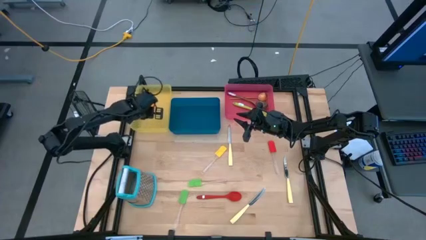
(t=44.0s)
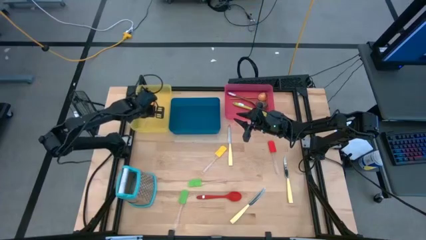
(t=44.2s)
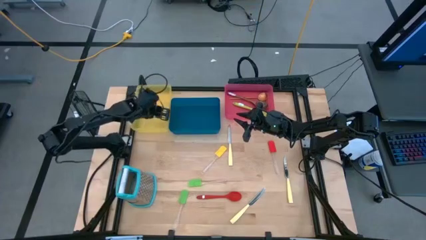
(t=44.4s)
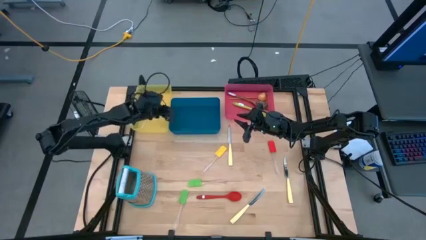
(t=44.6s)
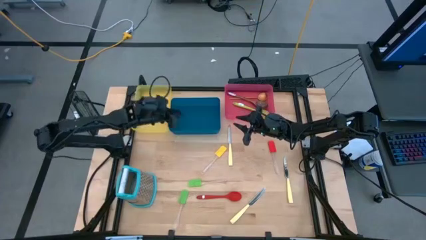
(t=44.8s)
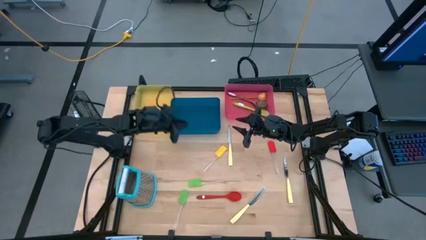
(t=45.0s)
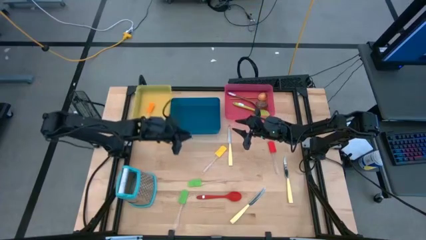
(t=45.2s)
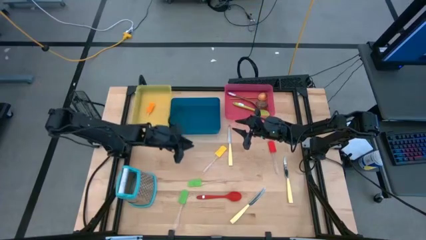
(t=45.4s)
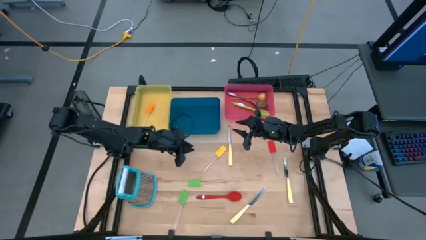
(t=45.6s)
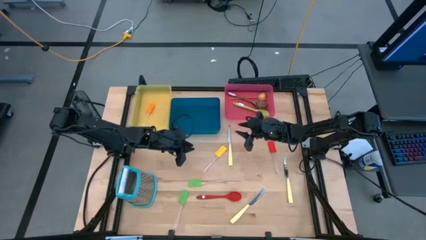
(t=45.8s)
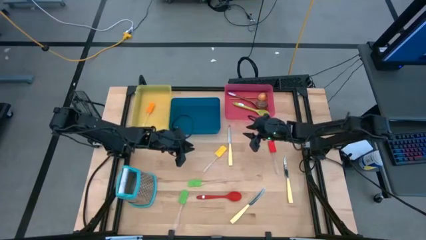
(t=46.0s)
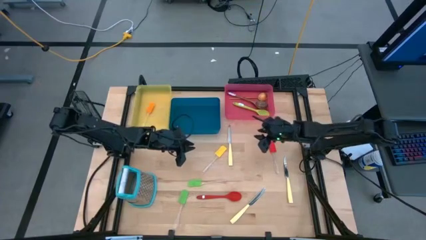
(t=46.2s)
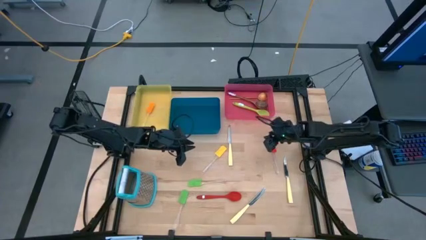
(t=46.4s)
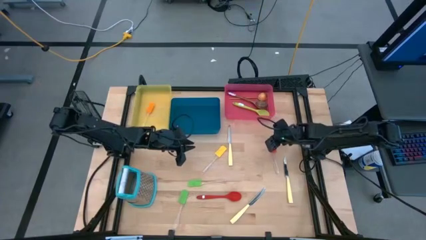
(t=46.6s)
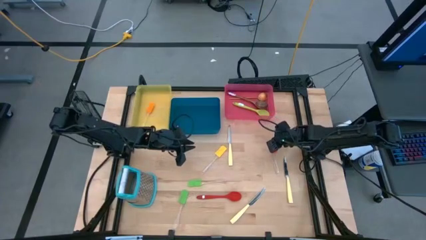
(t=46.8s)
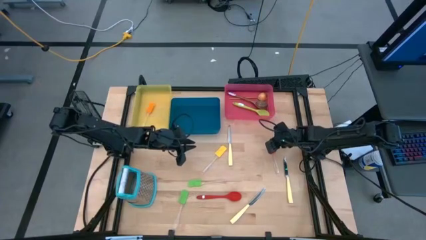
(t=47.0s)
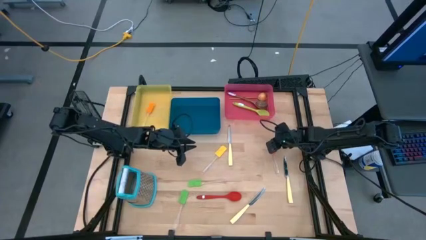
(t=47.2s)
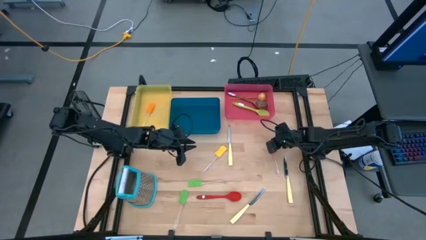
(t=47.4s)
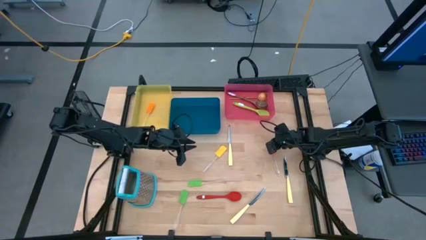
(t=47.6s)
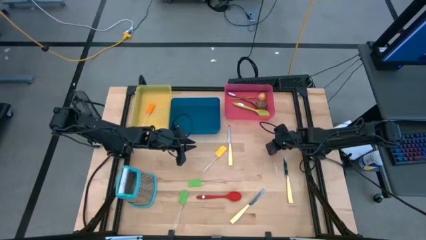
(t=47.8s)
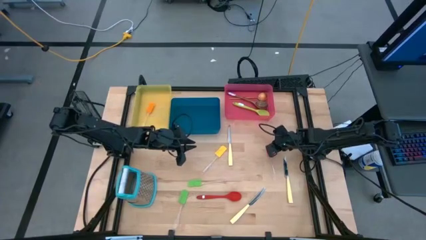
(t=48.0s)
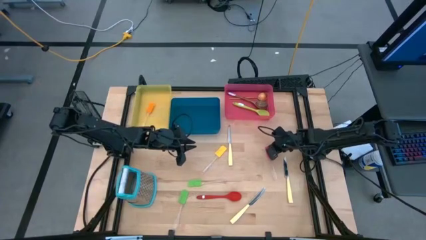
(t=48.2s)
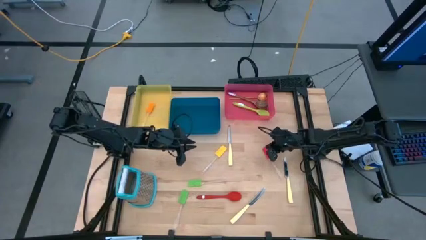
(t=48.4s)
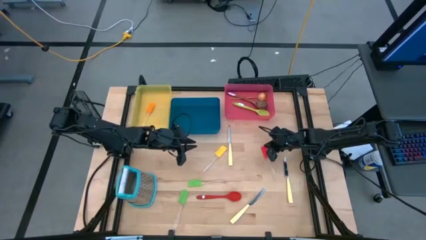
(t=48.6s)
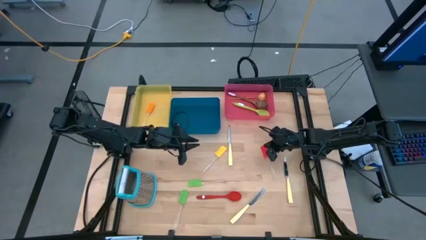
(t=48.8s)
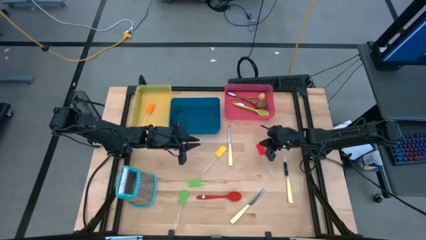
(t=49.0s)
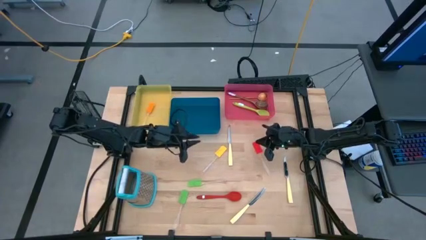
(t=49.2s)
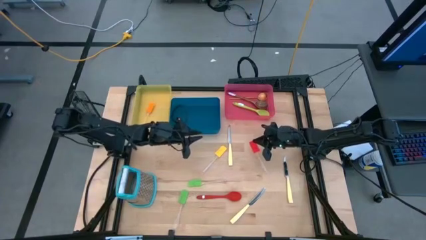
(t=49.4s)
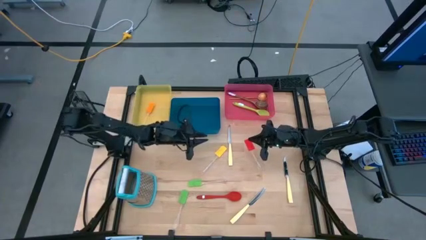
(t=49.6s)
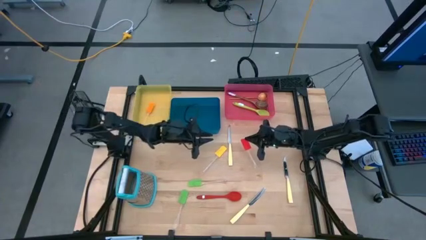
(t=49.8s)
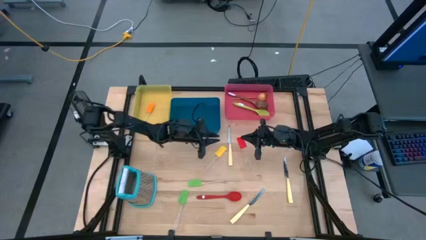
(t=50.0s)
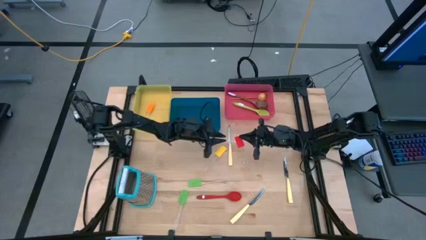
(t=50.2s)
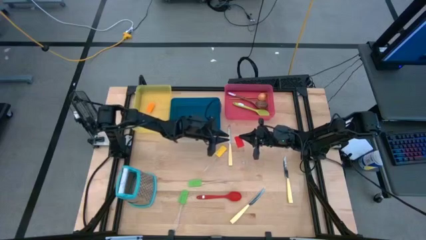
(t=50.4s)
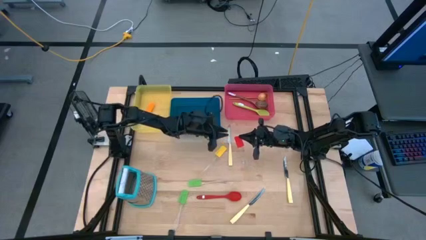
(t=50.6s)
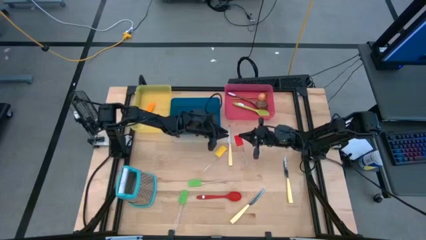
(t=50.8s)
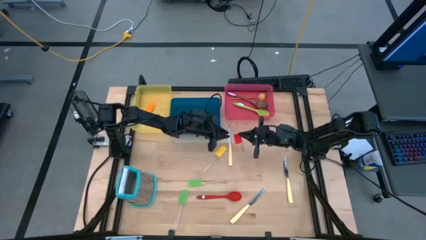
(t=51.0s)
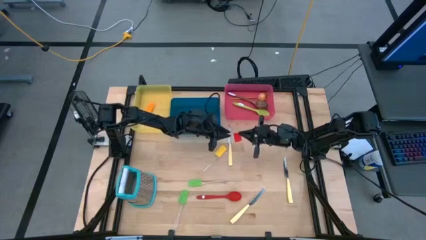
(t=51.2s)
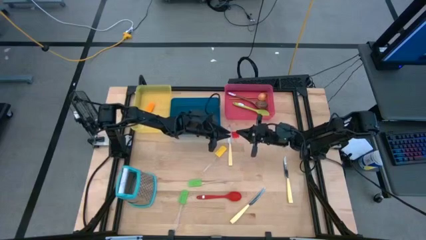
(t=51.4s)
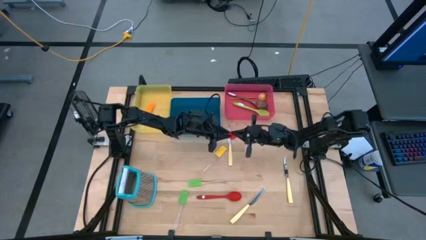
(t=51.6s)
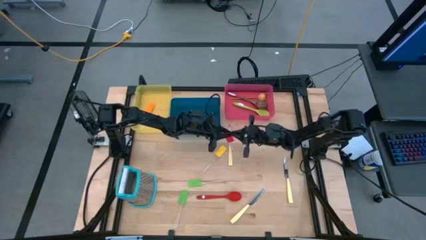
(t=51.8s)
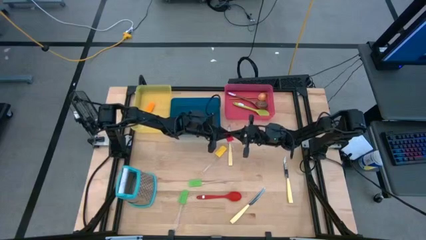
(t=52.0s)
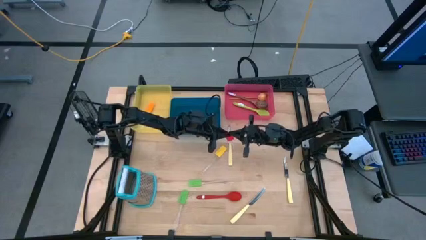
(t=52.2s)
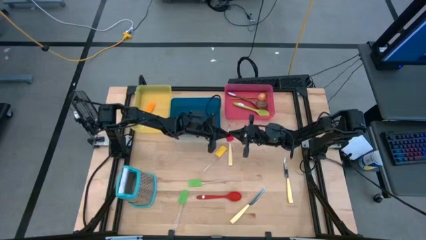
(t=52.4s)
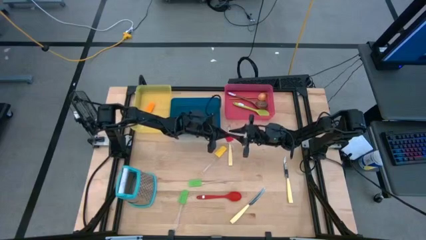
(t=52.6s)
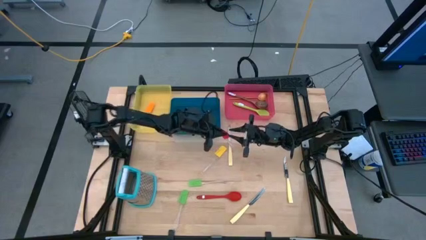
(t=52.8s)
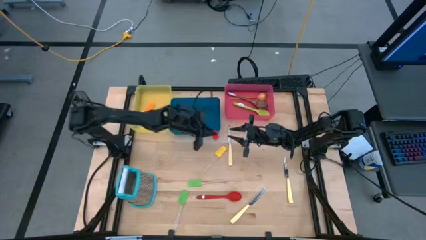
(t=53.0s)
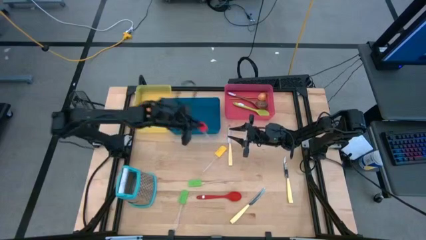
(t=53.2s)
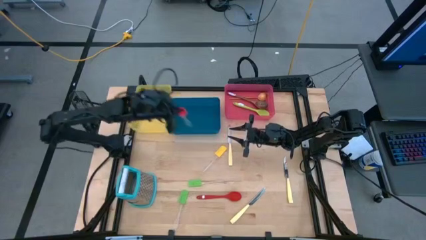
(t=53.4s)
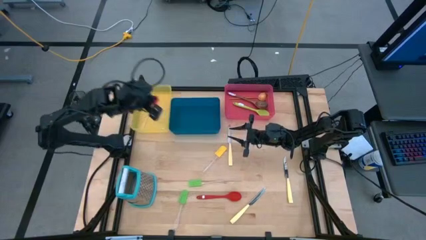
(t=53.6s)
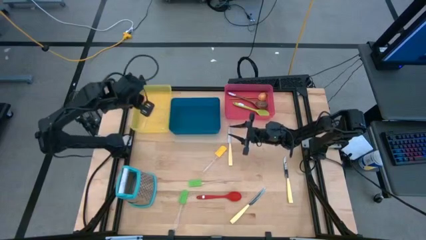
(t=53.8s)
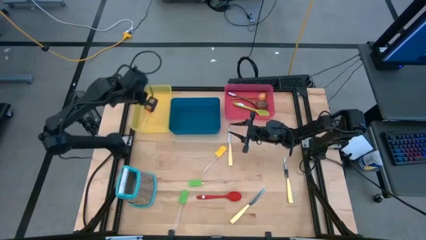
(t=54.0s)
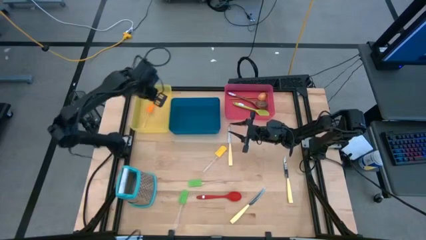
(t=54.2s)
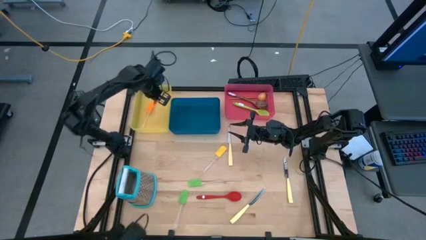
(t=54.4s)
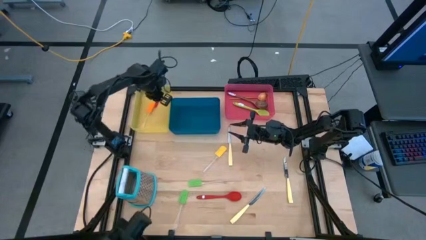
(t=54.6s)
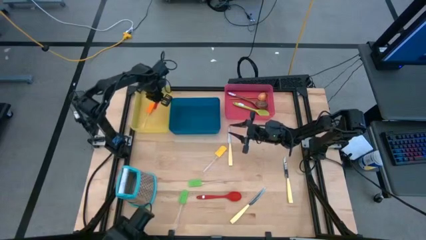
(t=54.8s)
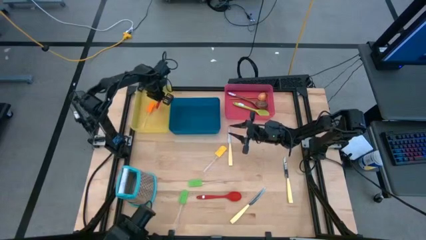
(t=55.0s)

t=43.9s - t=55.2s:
Task: Pick & Place Kitchen Items
Put the red spatula into the yellow bin
